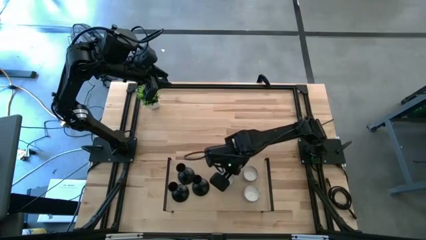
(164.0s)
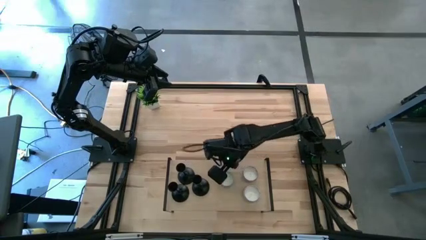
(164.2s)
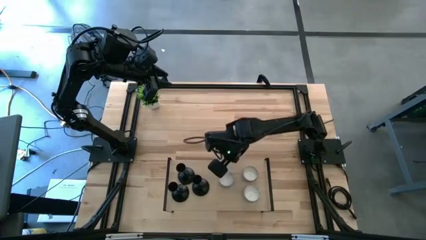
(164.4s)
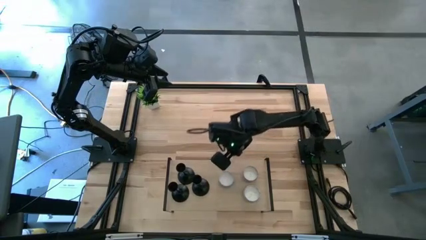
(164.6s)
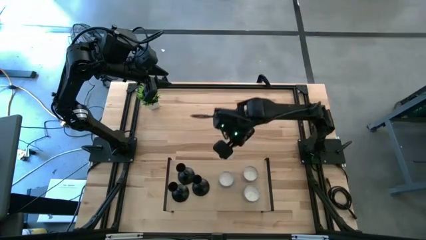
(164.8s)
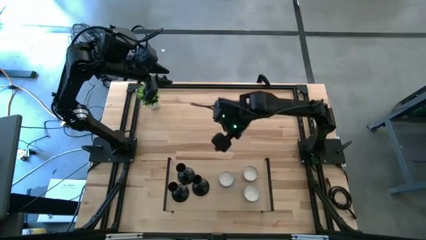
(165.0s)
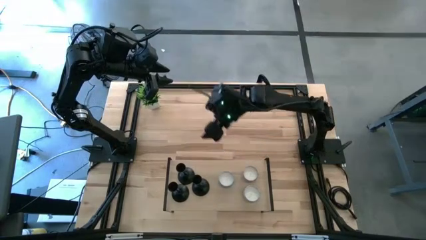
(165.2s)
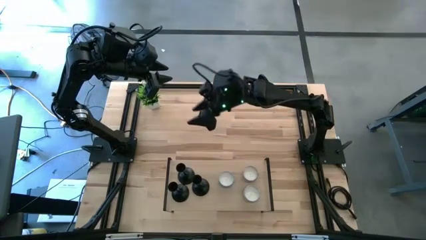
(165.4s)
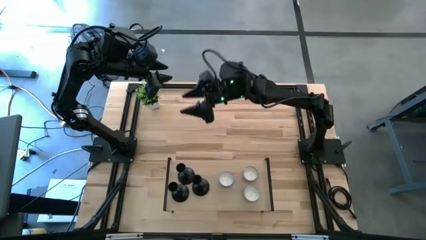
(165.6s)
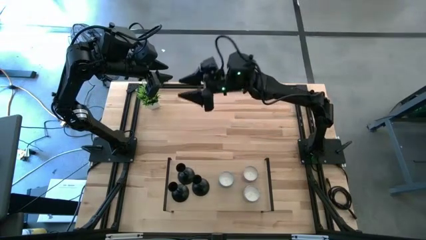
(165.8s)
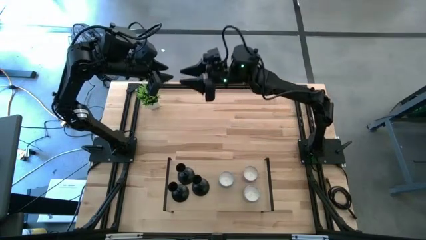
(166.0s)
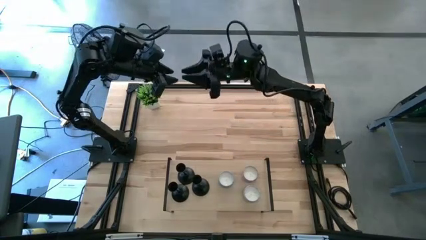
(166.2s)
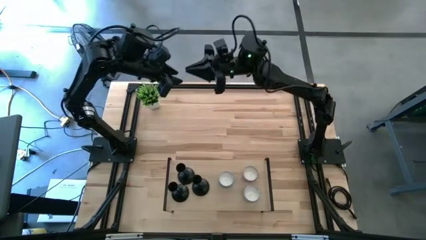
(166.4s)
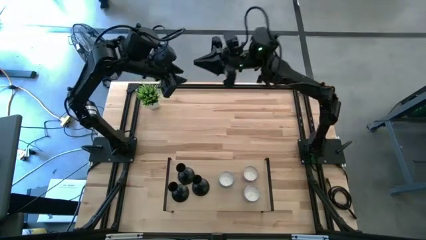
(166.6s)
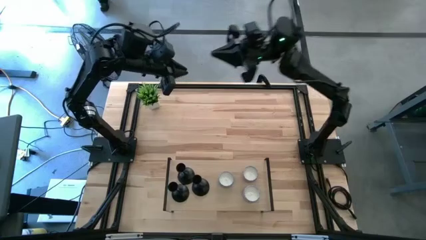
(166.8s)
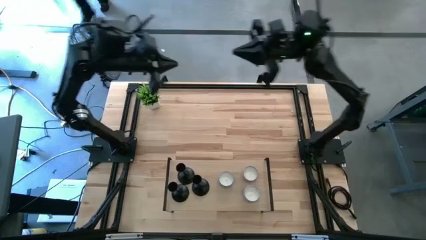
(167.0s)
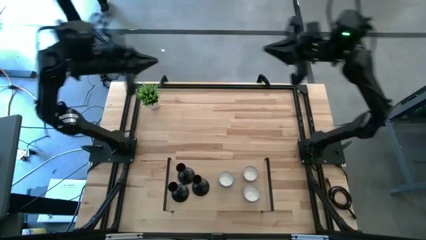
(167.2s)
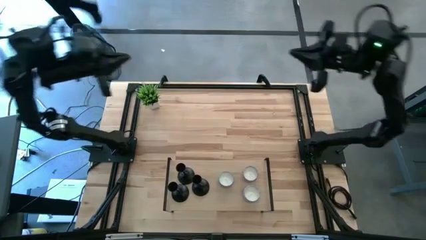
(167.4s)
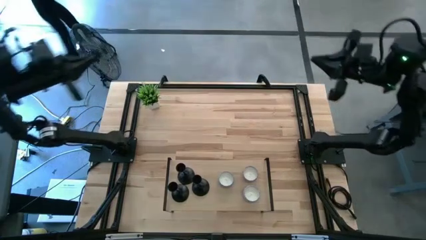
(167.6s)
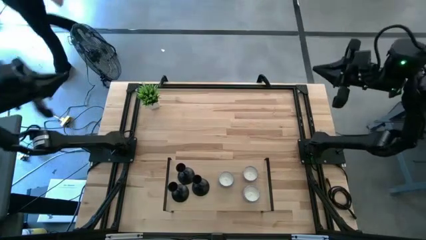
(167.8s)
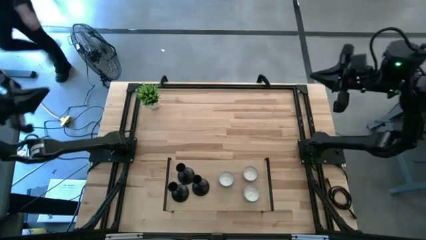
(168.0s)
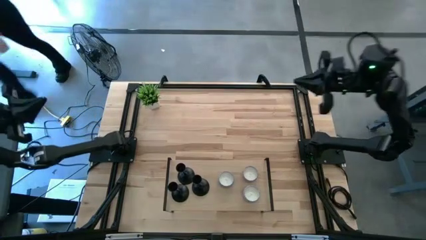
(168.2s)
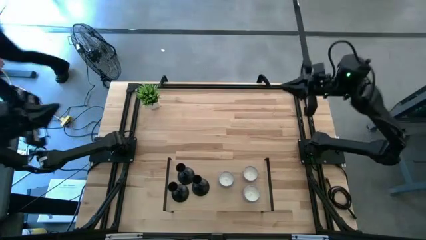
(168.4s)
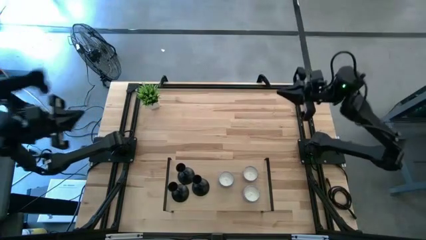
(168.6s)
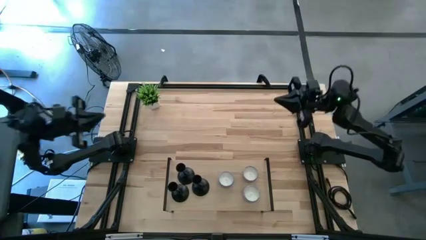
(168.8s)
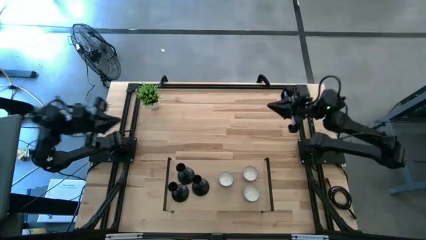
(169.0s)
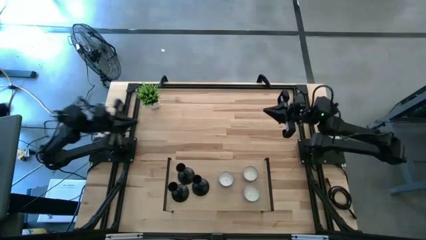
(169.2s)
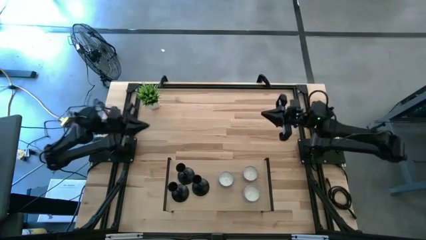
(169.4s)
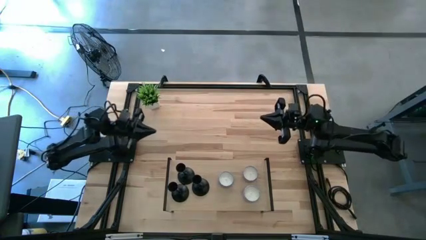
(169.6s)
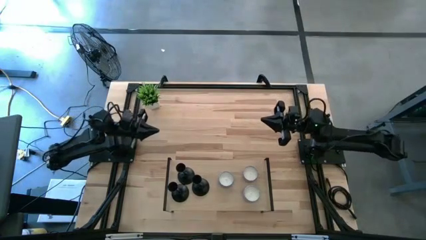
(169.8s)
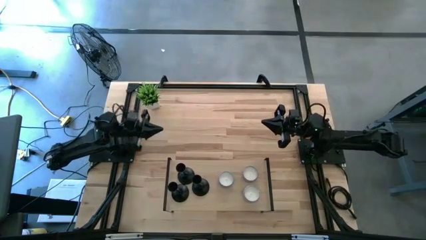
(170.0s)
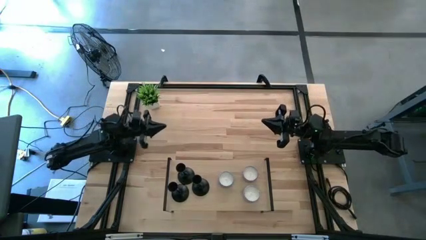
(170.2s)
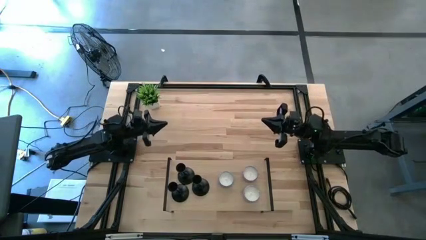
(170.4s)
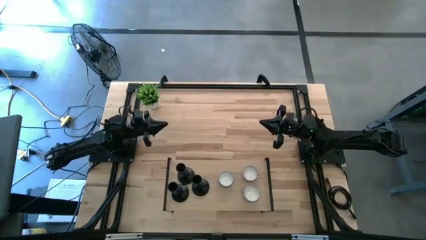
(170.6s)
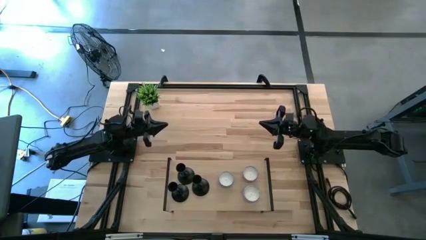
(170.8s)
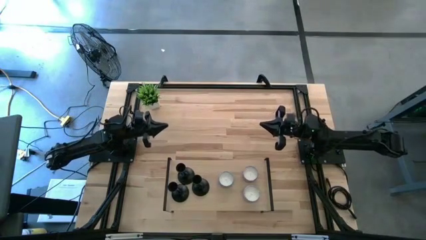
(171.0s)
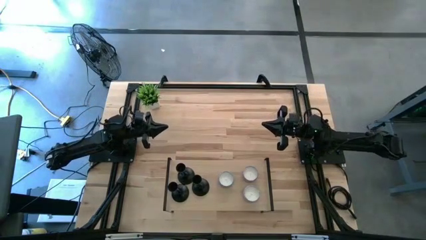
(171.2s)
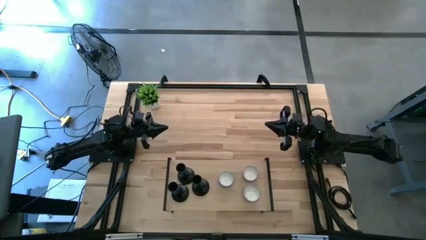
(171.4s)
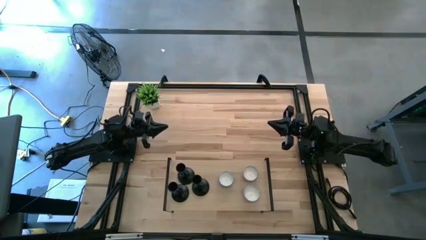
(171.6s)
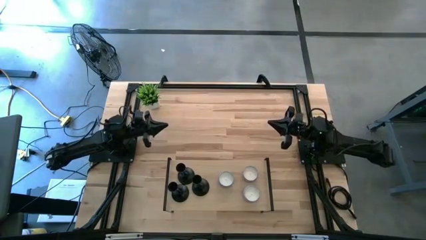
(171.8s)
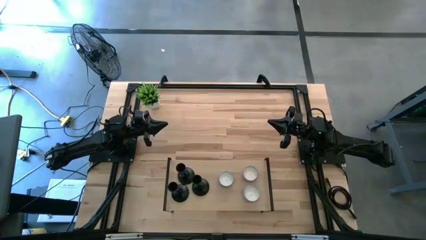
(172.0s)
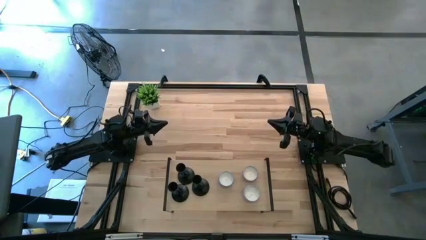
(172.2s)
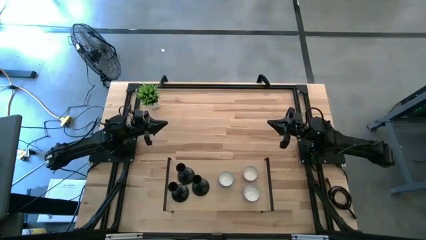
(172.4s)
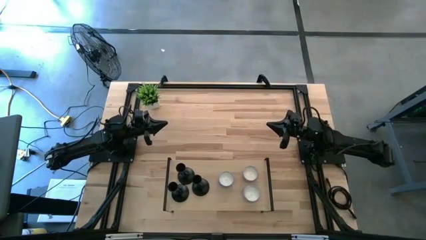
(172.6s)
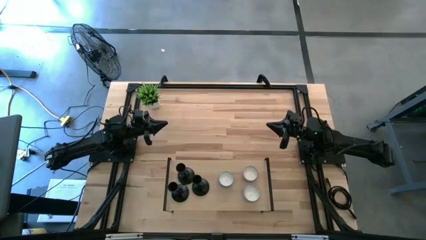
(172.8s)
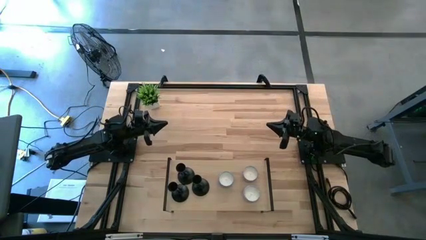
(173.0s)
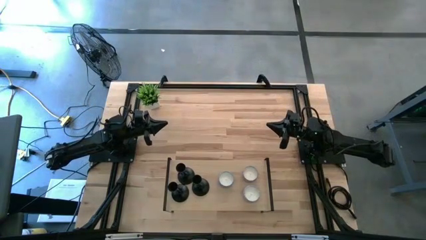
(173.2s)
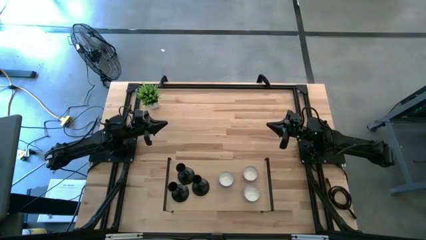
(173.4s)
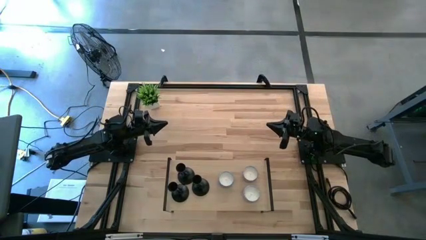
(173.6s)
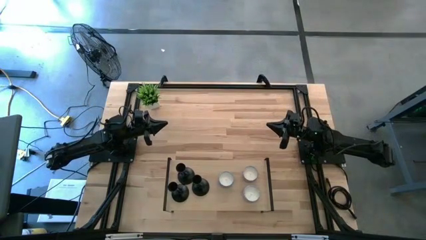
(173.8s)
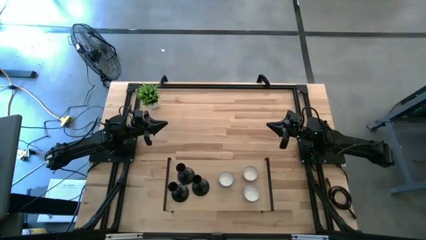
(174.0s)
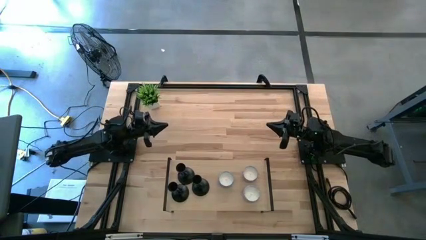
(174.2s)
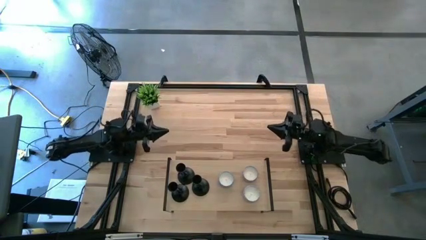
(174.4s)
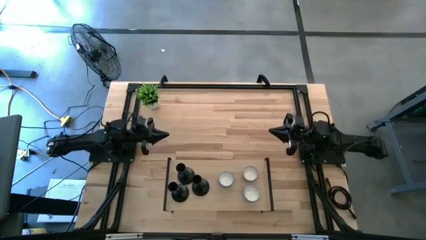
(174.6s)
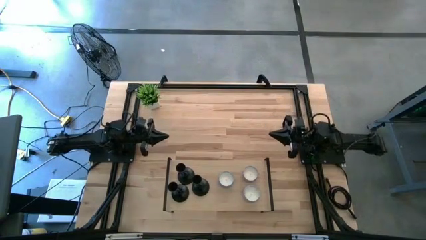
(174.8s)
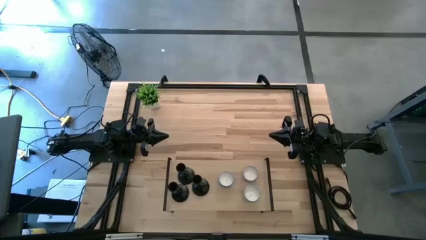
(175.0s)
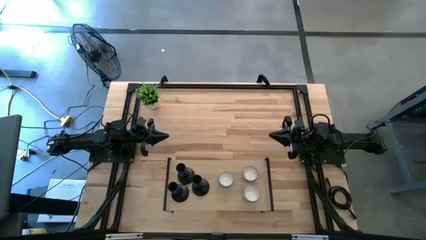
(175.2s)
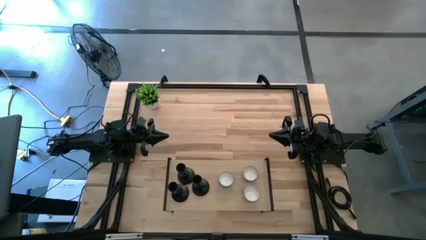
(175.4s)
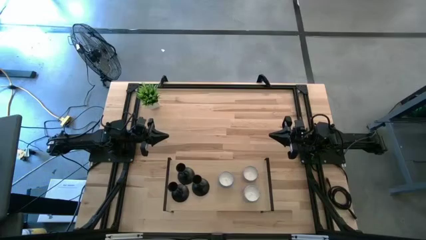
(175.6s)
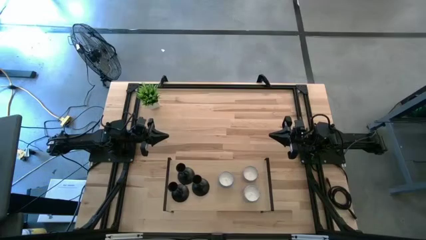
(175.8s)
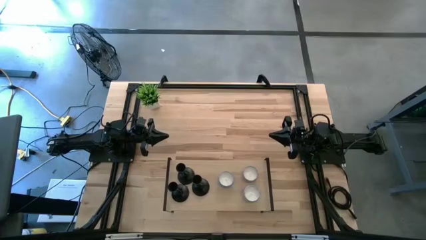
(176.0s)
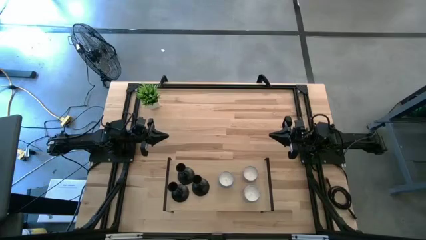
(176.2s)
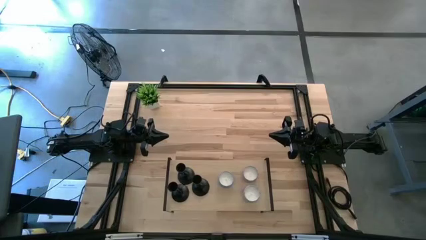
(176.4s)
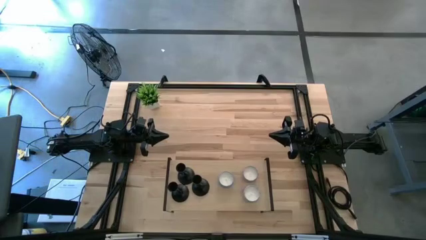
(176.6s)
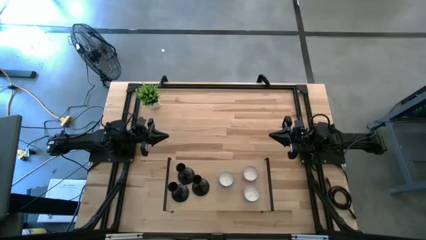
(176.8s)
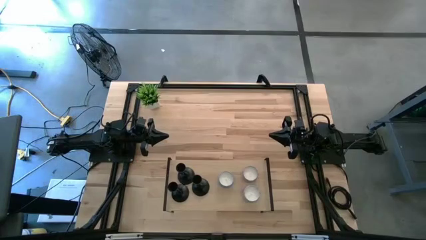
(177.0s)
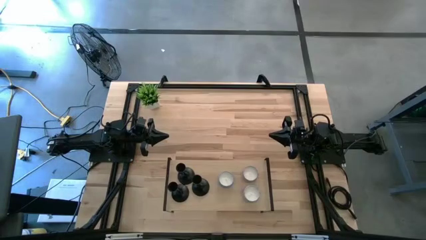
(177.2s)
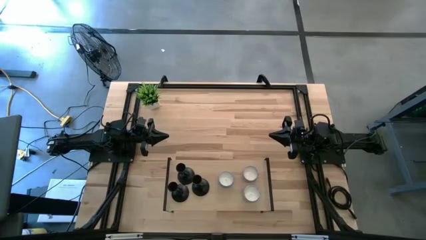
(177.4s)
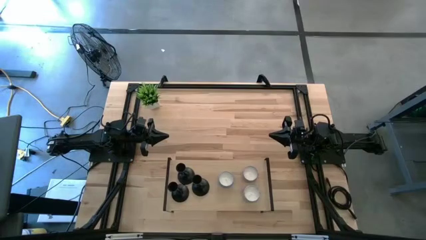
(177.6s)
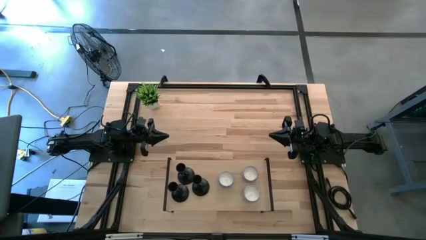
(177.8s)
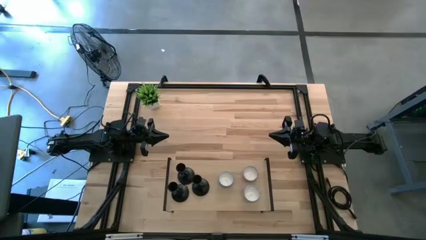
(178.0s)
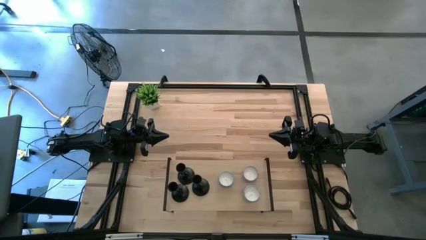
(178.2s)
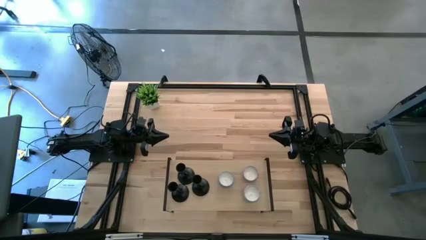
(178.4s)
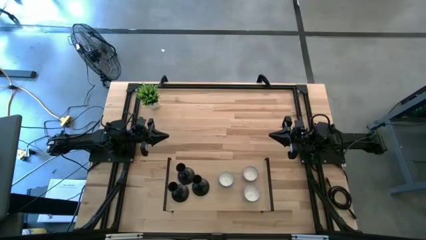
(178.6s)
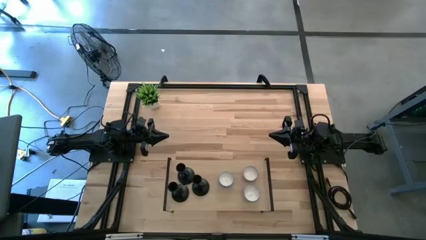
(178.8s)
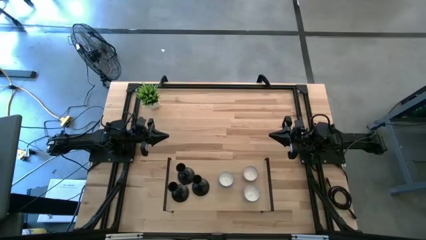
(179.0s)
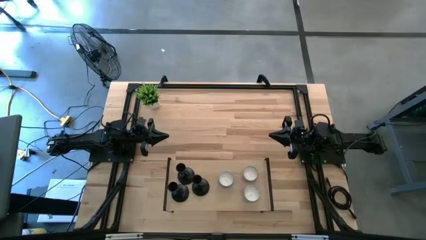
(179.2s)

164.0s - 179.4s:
Task: Pick & Place candle stick holders
Return to Home Position
